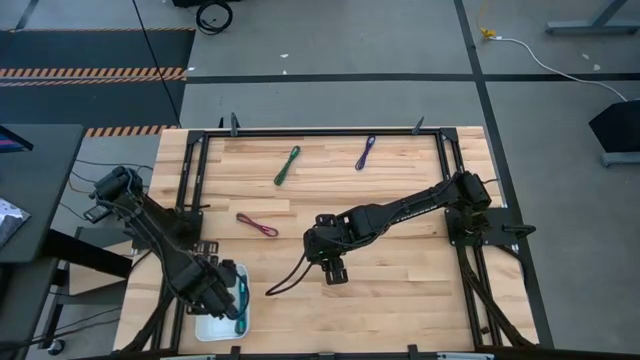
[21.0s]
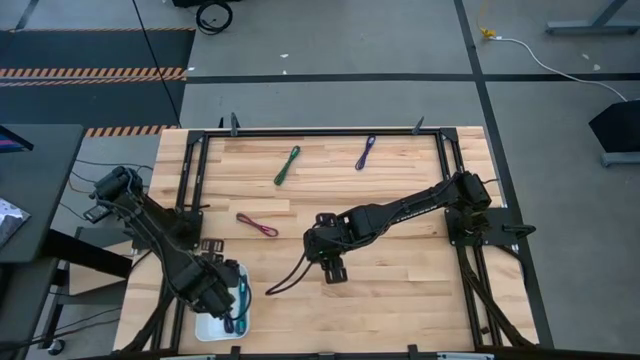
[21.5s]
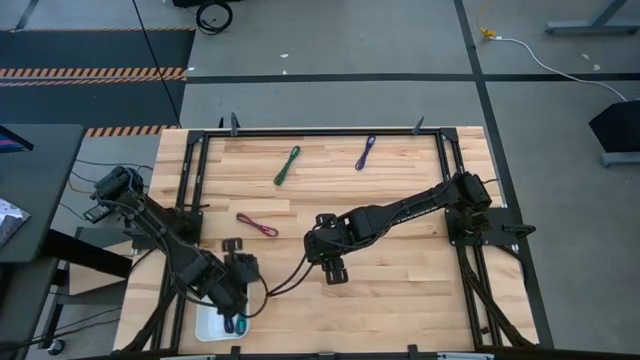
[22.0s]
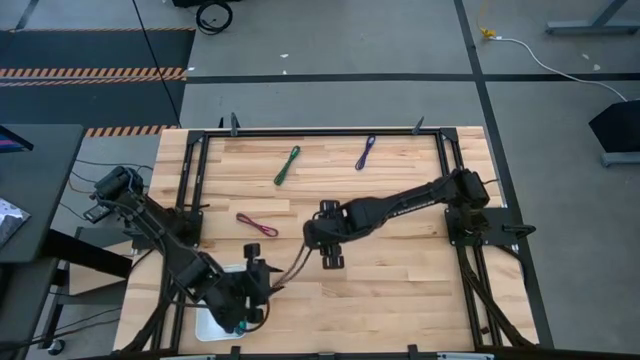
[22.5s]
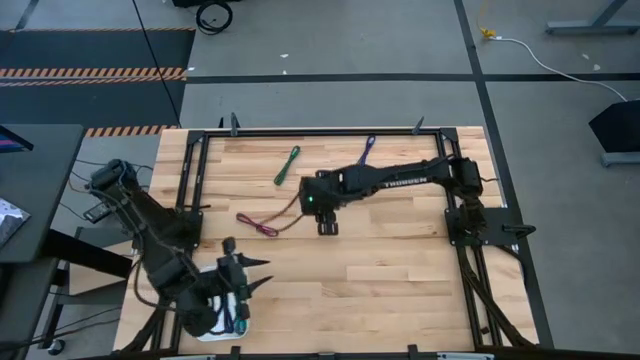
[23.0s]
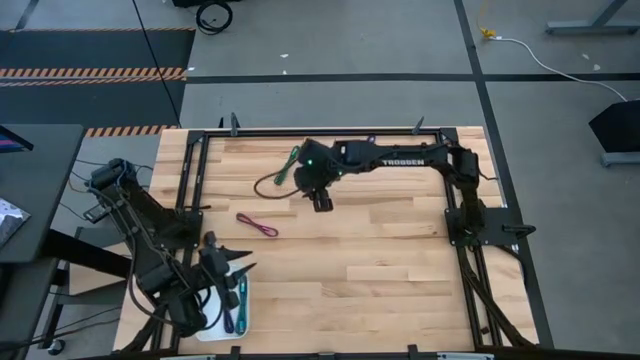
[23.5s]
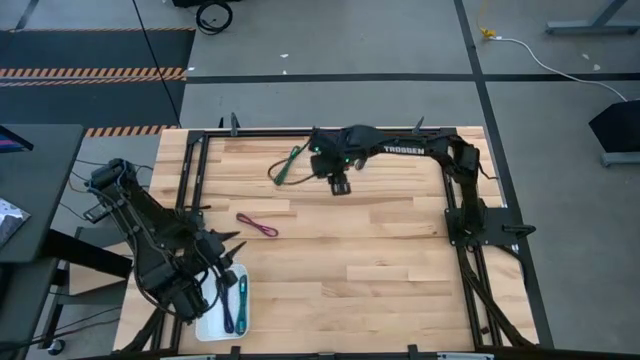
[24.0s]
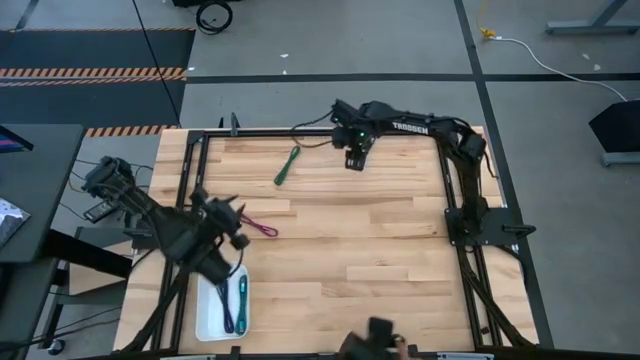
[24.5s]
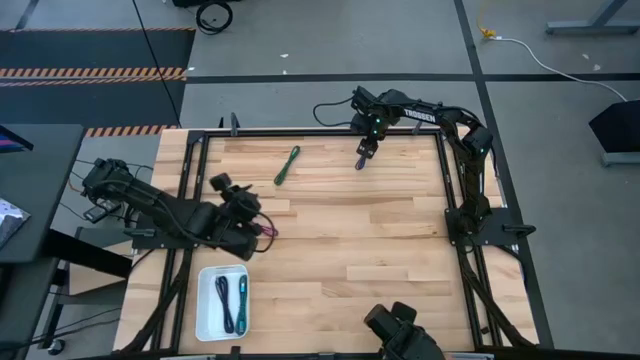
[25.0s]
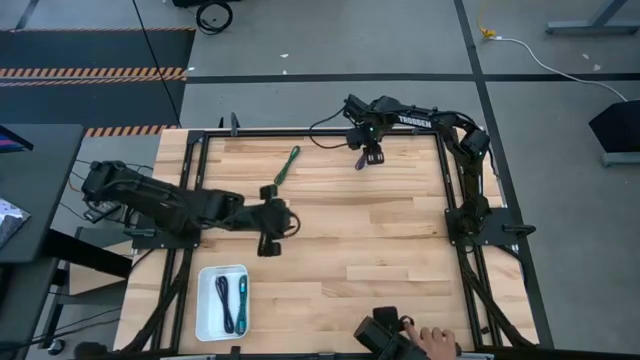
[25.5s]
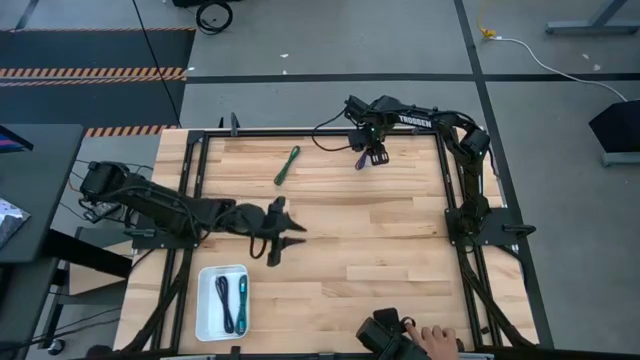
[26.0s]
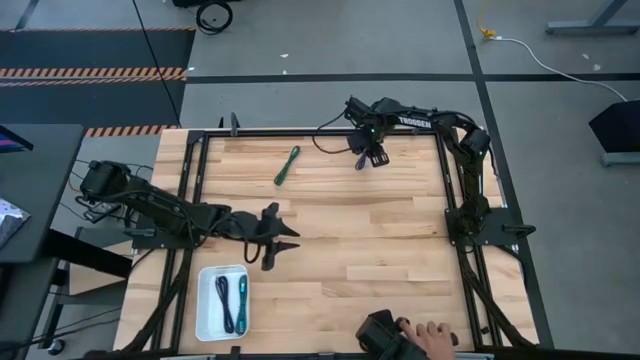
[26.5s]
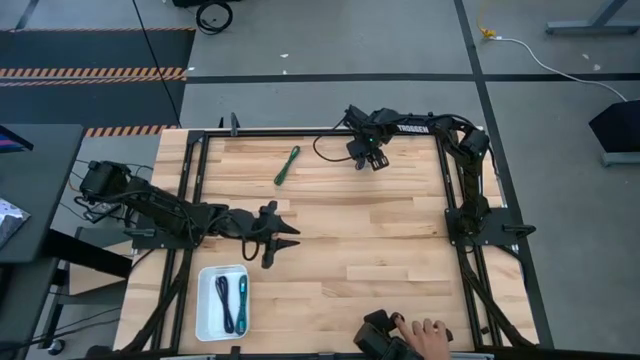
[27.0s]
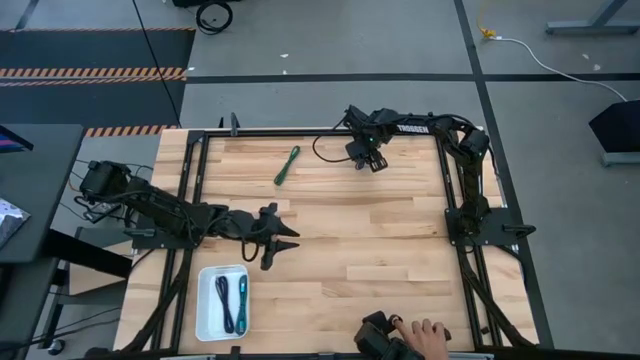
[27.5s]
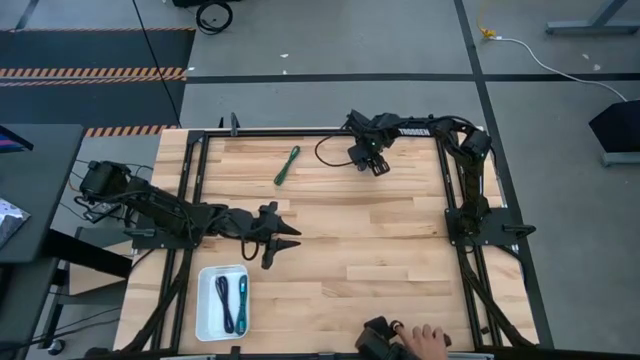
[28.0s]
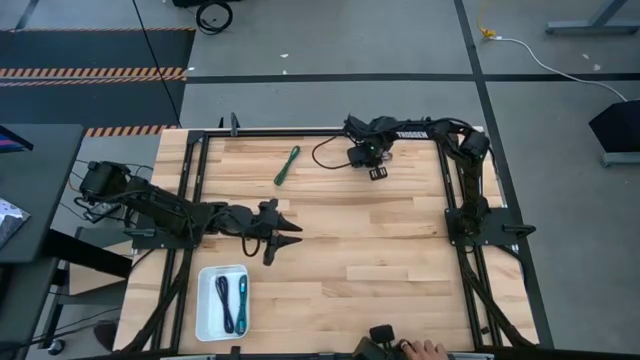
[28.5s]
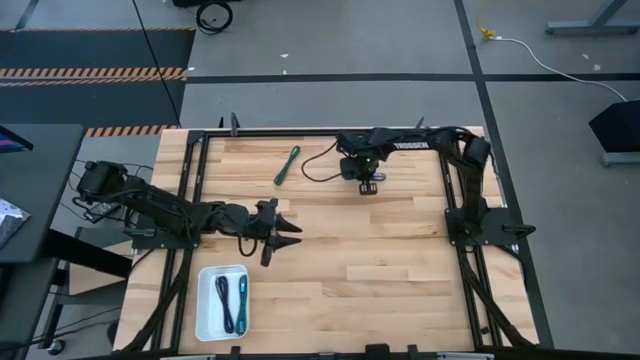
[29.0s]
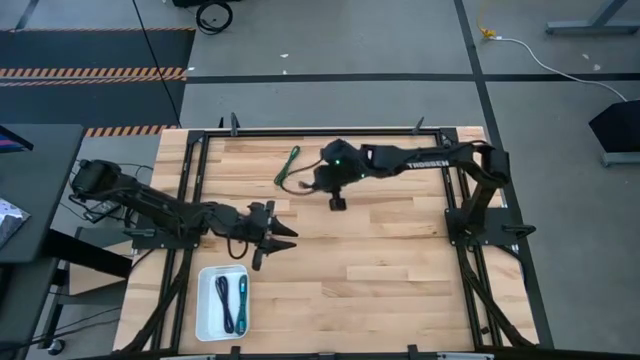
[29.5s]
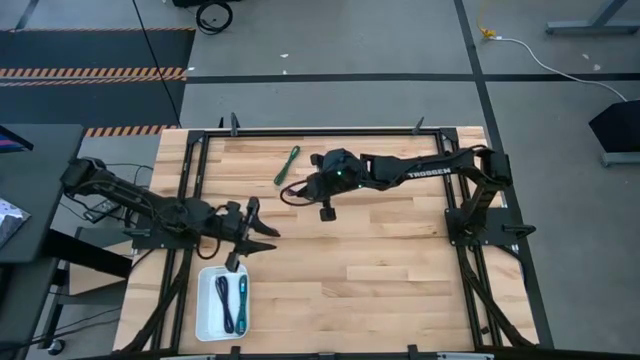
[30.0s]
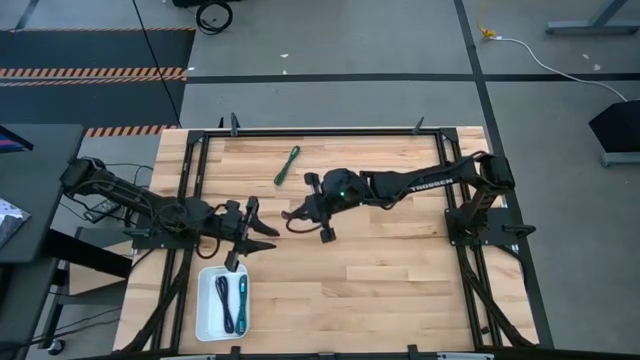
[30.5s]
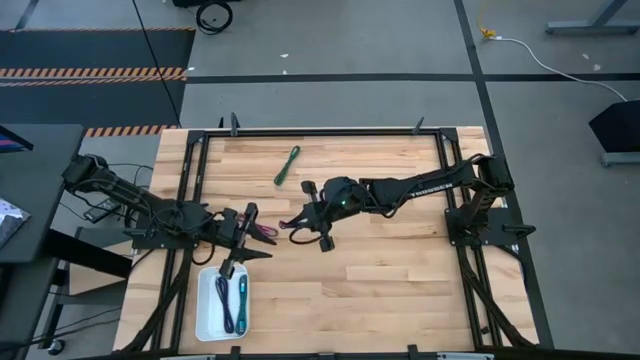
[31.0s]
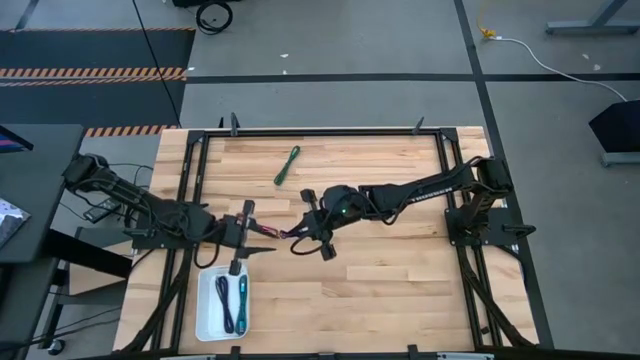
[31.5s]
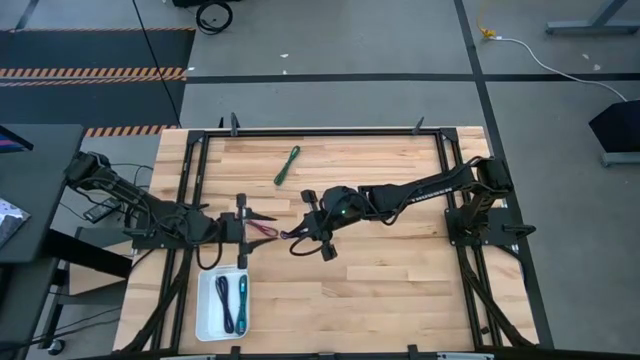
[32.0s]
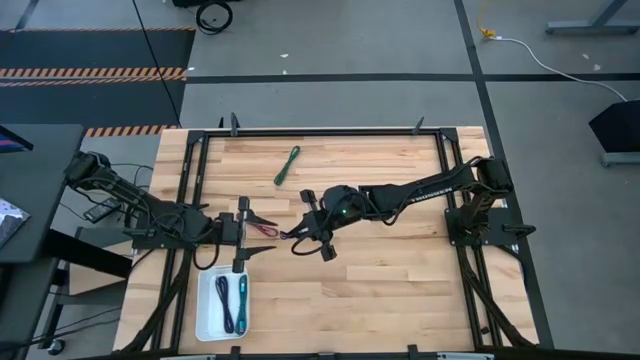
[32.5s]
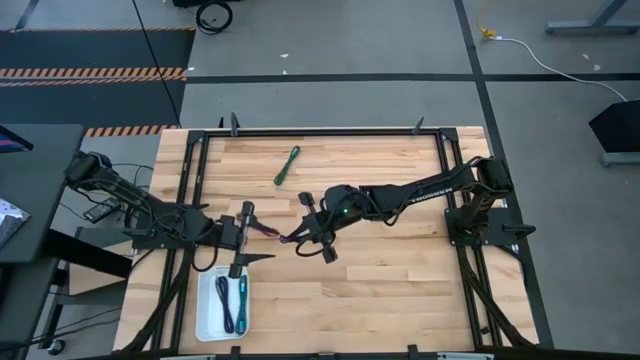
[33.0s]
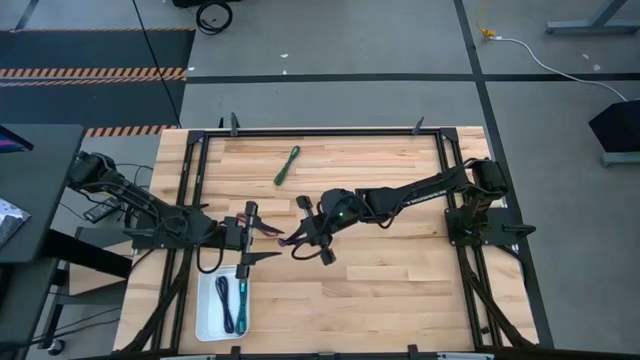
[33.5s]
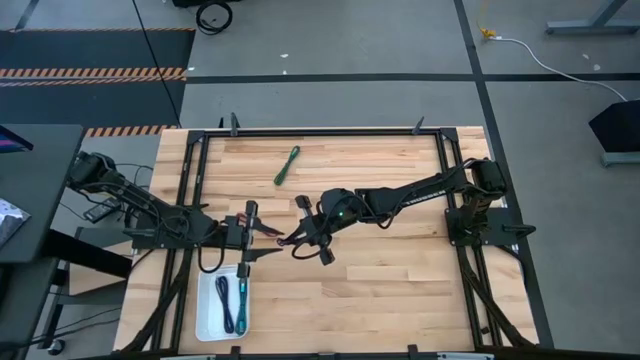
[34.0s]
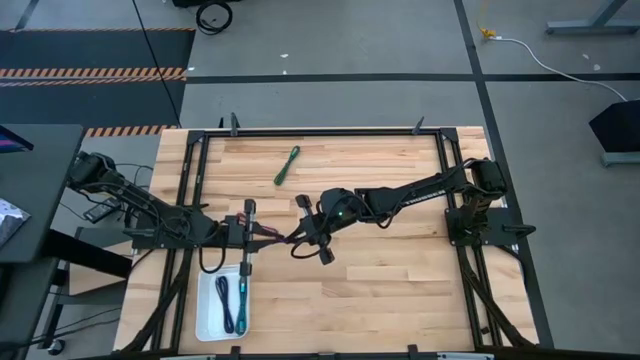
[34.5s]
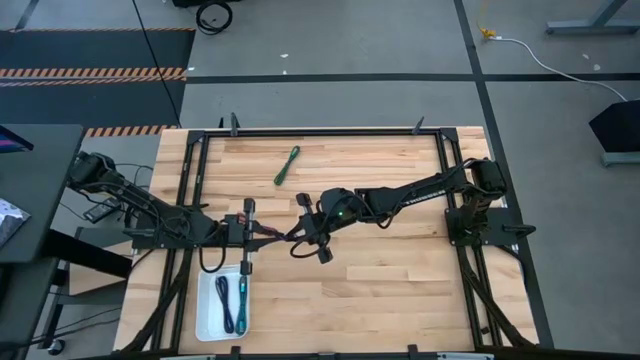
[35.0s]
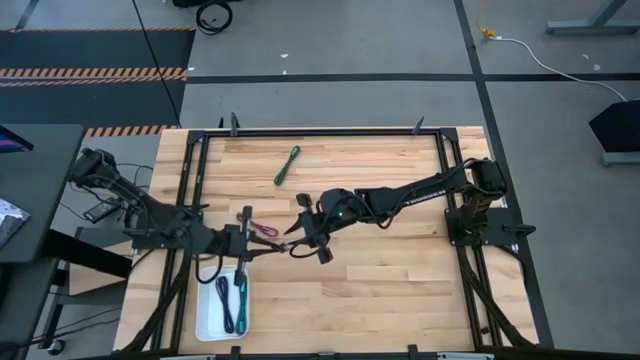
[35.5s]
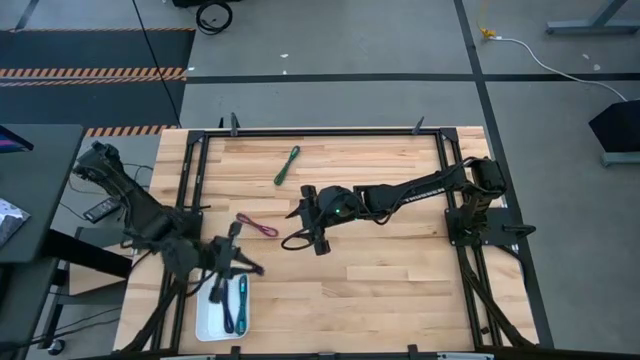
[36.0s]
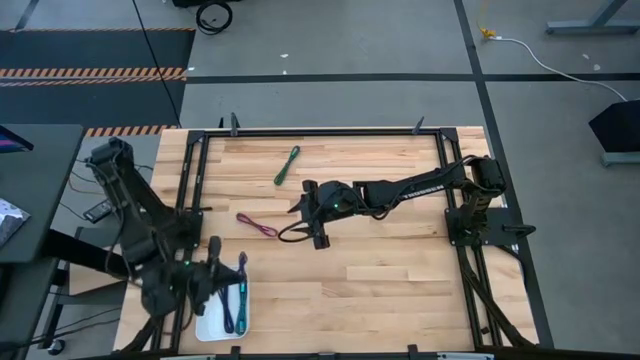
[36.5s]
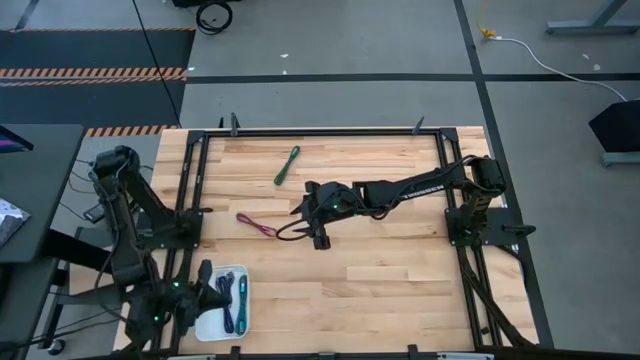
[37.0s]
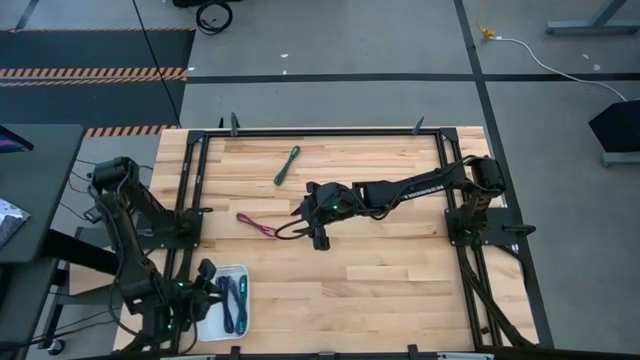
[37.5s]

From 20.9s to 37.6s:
Task: Pick and place USB-C Cables
Put the blue charger cable into the bin

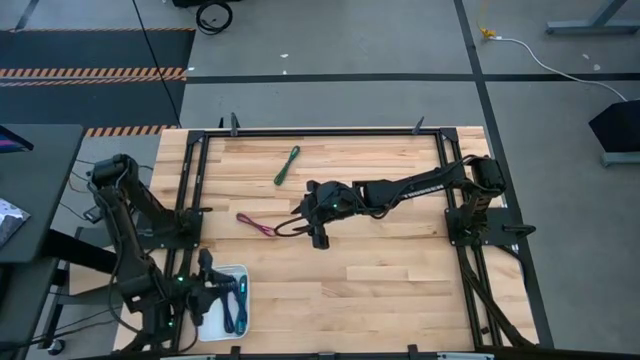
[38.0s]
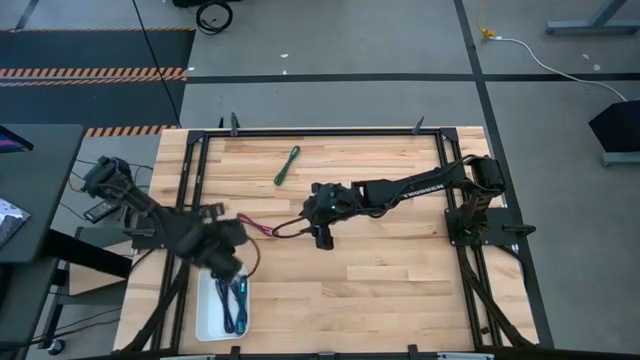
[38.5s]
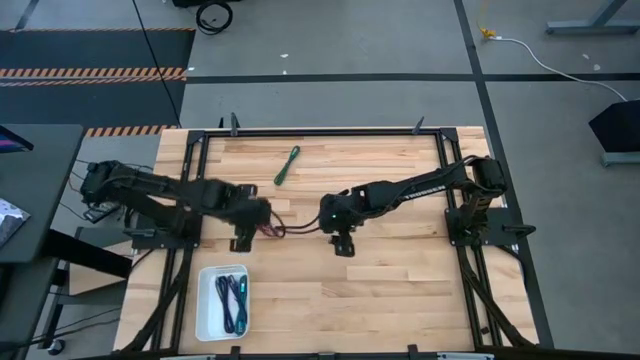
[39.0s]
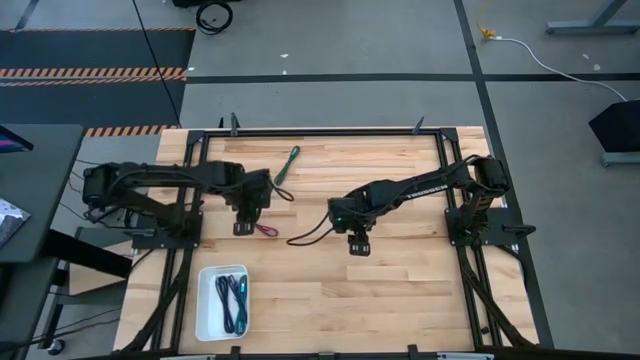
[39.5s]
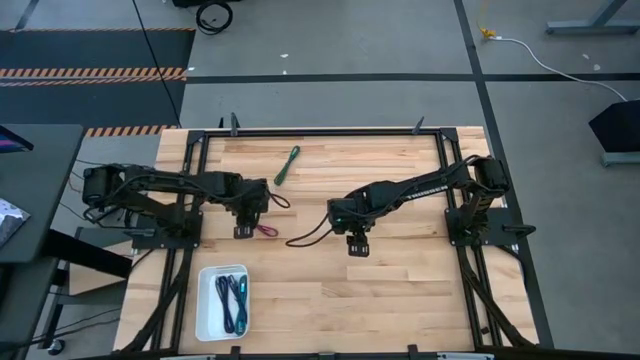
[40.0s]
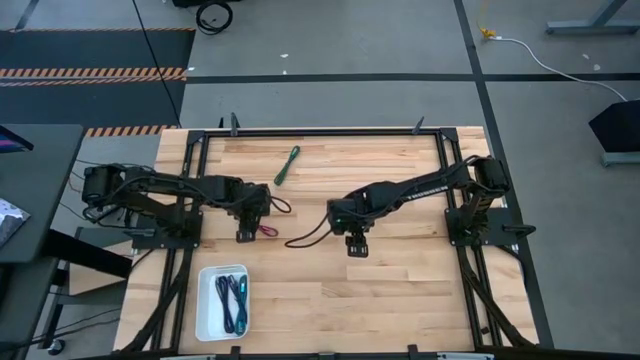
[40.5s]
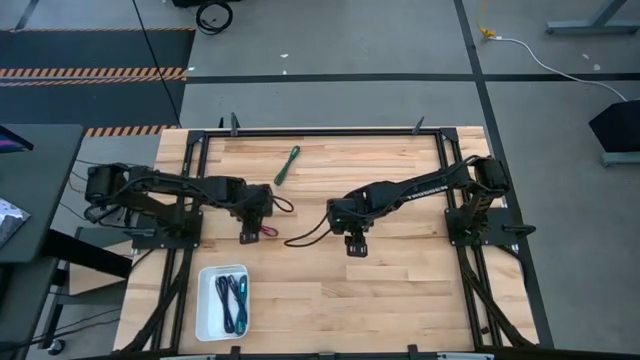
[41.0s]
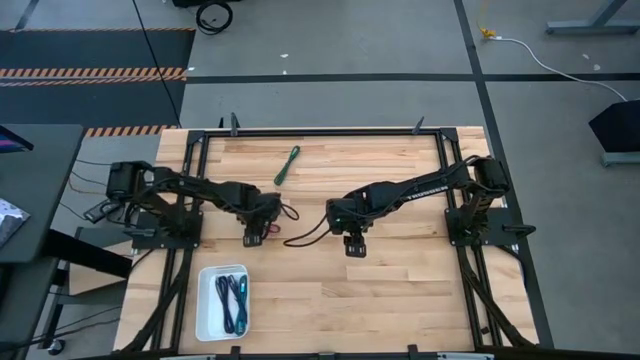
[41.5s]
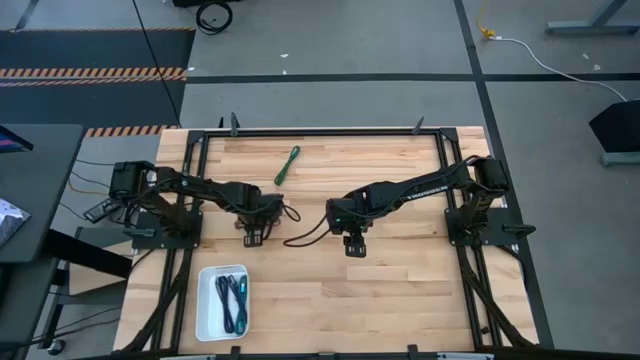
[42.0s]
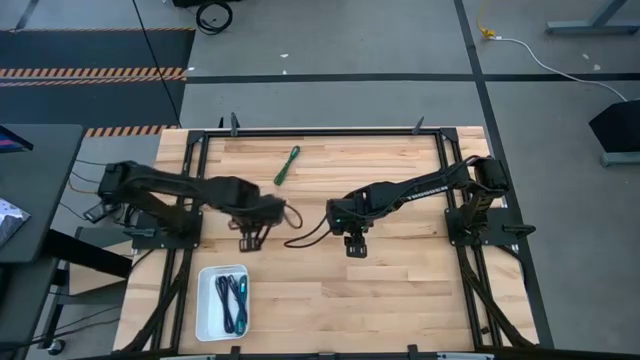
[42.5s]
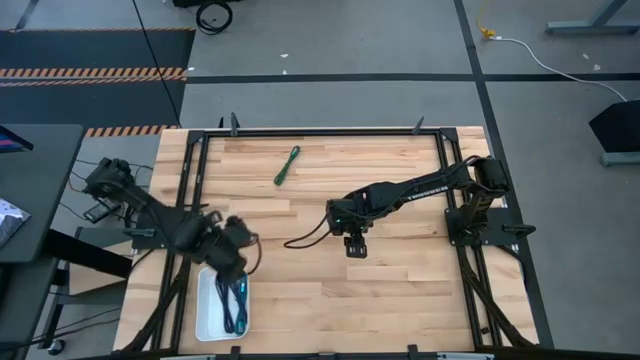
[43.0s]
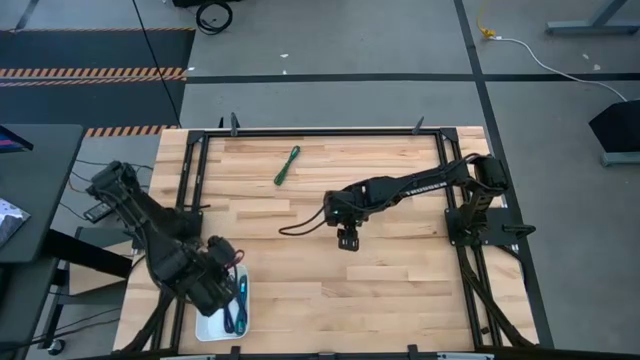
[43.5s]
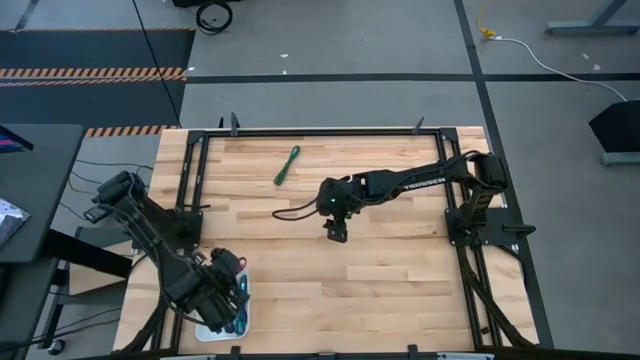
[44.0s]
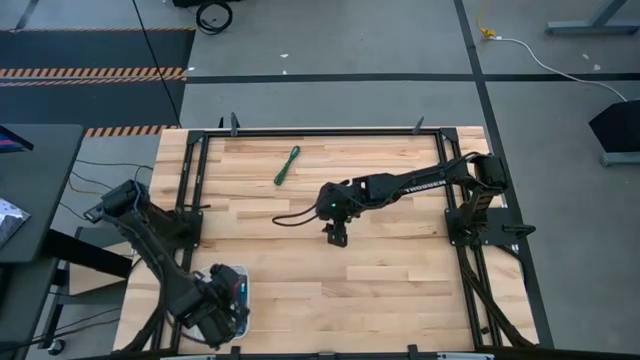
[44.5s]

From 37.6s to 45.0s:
Put the pink charger cable into the bin
